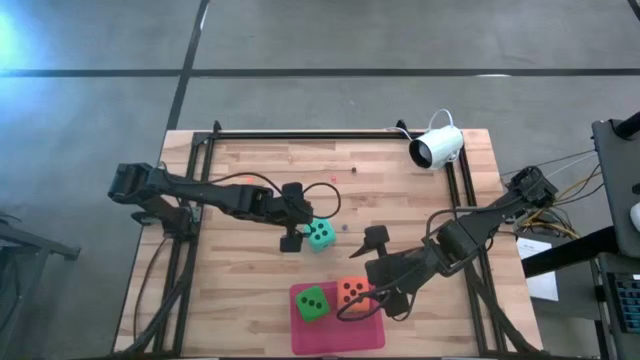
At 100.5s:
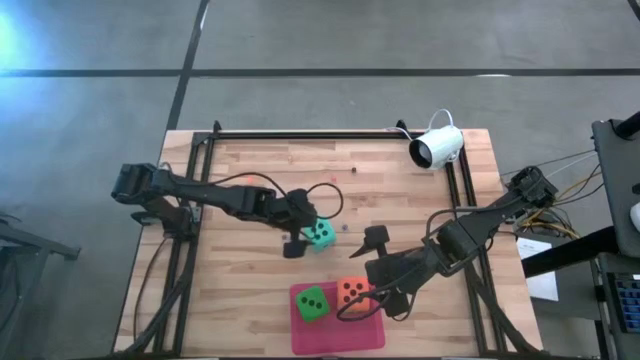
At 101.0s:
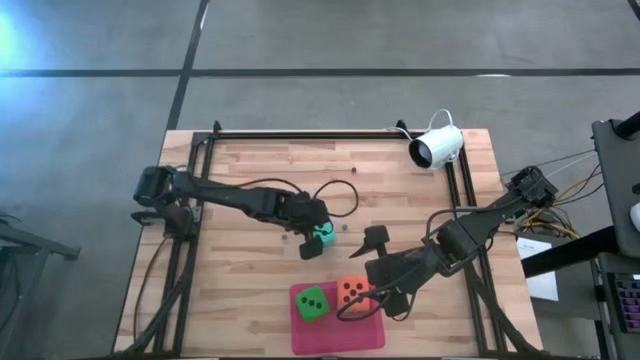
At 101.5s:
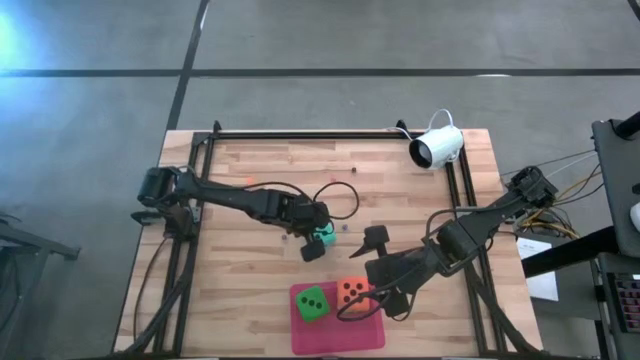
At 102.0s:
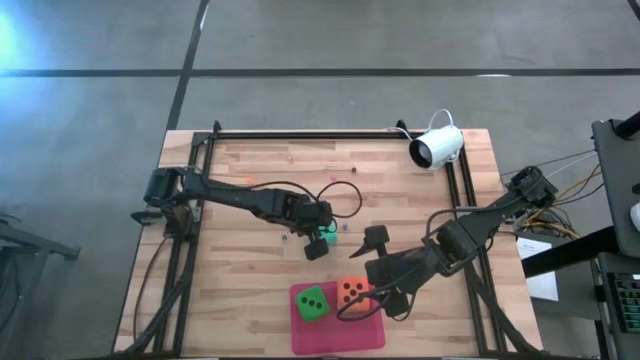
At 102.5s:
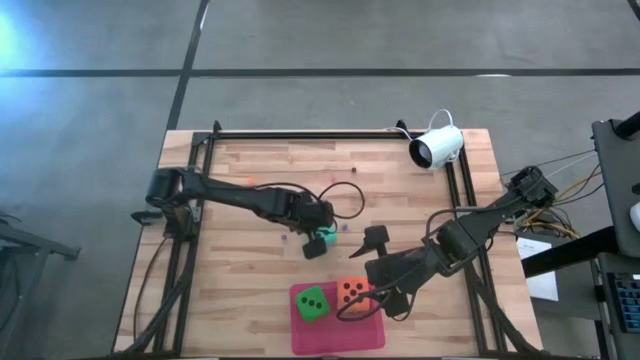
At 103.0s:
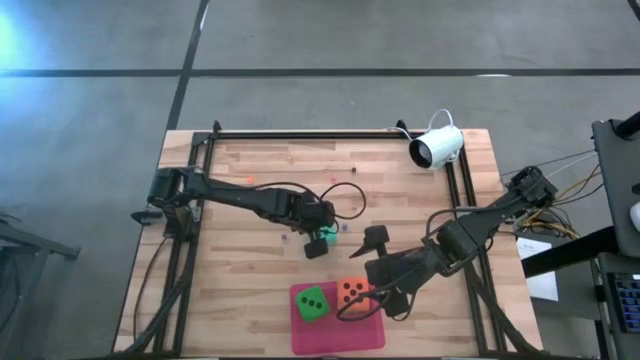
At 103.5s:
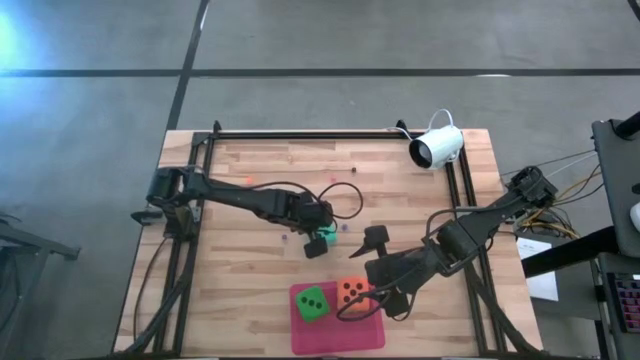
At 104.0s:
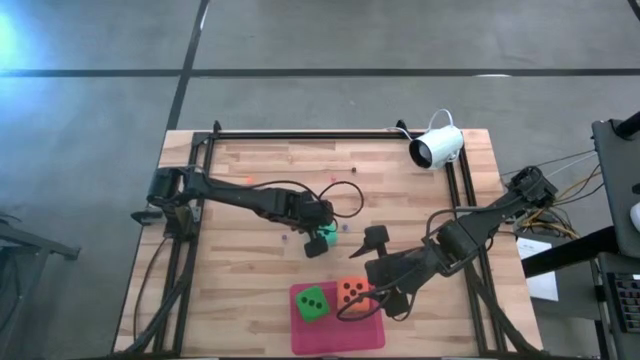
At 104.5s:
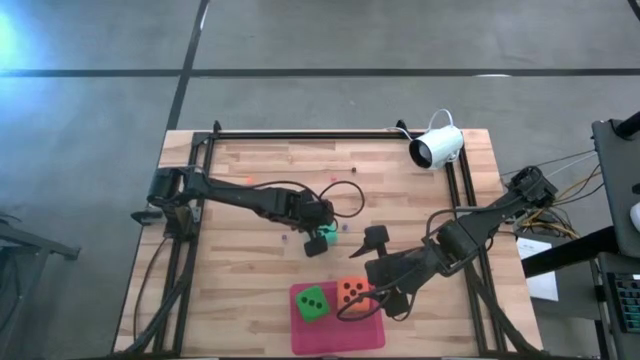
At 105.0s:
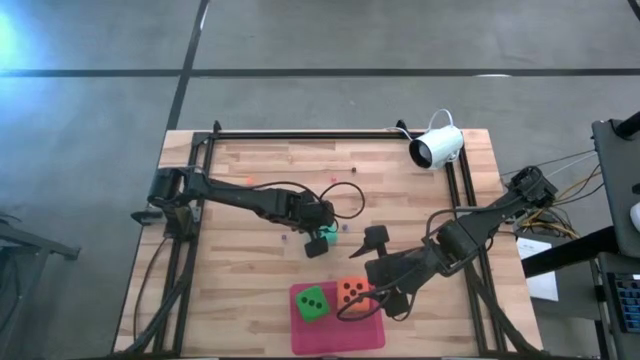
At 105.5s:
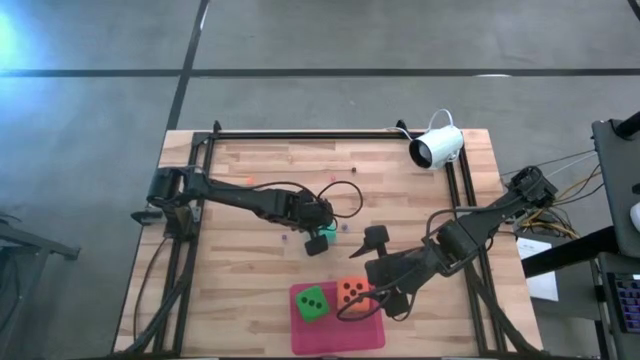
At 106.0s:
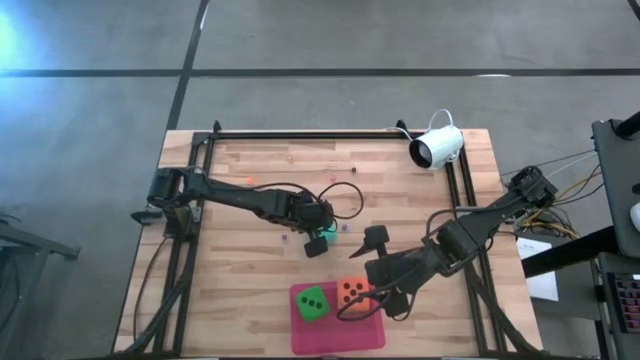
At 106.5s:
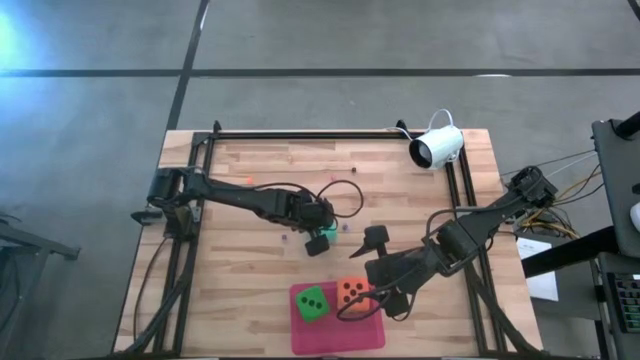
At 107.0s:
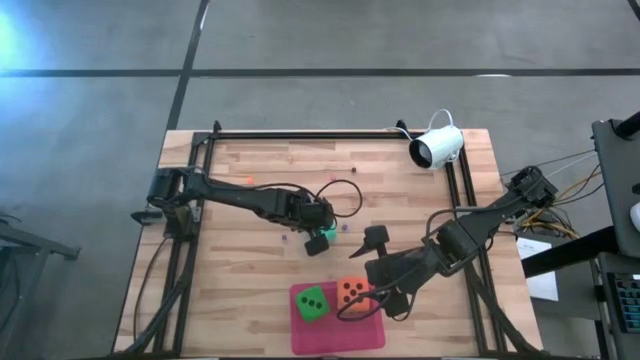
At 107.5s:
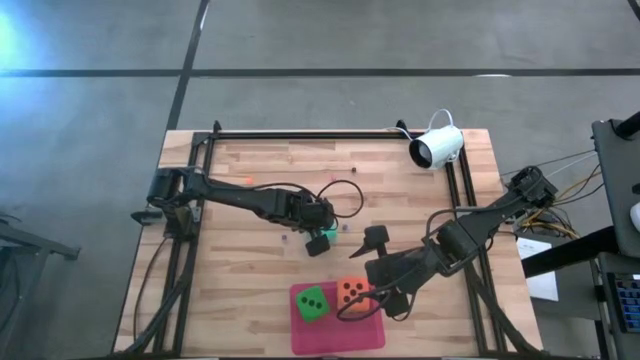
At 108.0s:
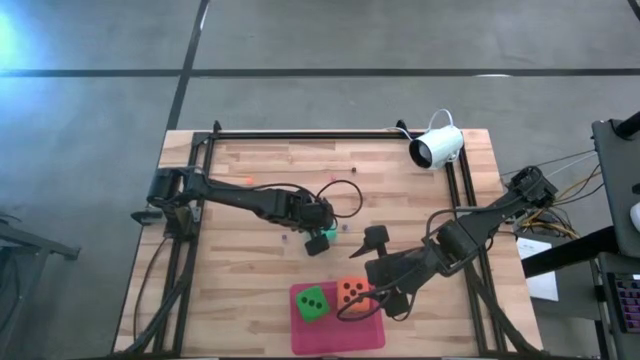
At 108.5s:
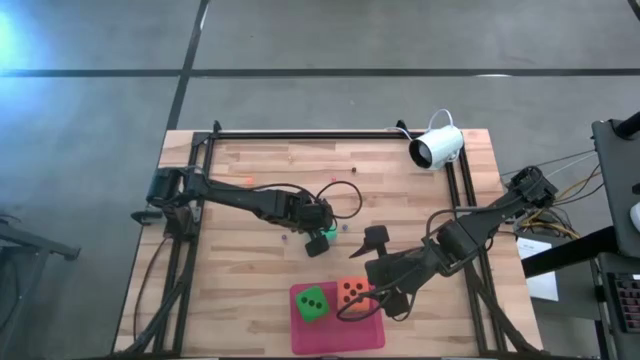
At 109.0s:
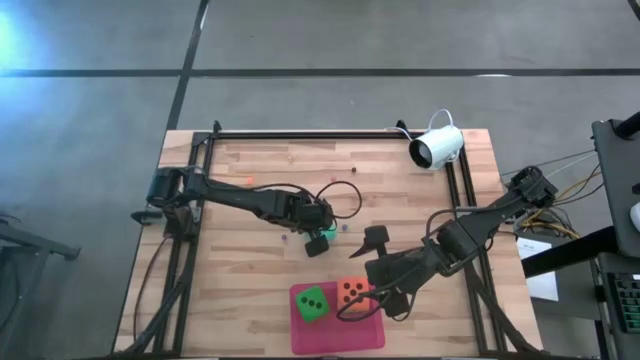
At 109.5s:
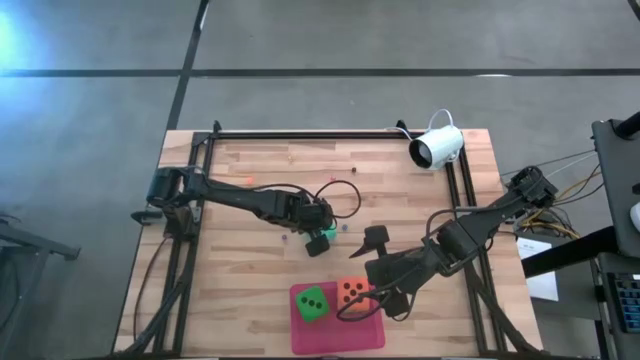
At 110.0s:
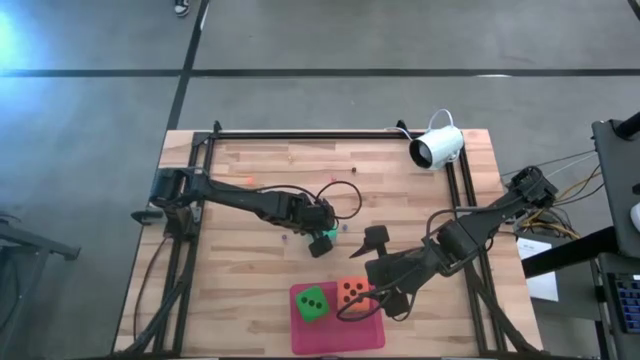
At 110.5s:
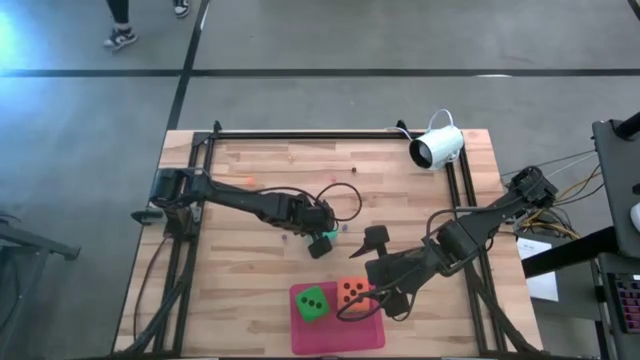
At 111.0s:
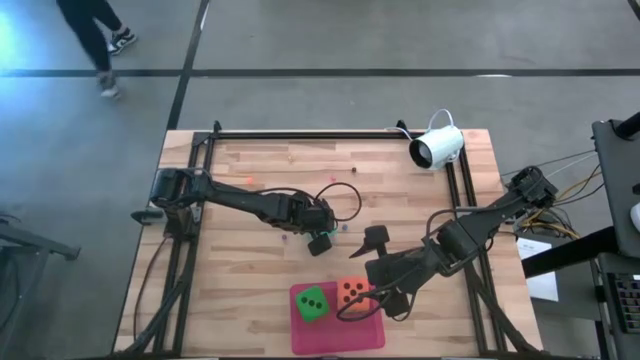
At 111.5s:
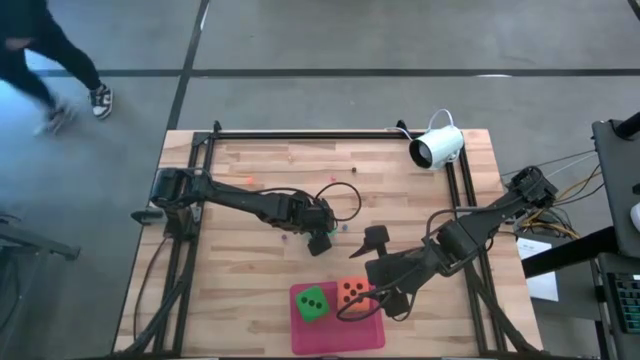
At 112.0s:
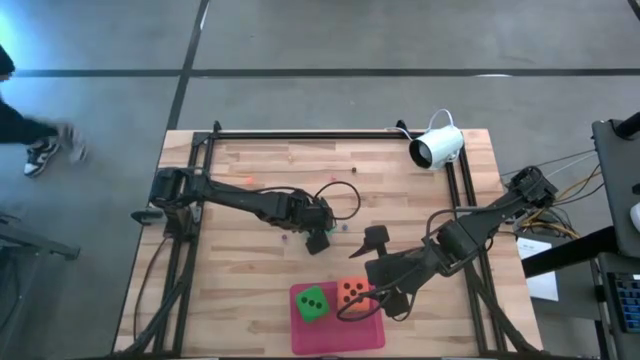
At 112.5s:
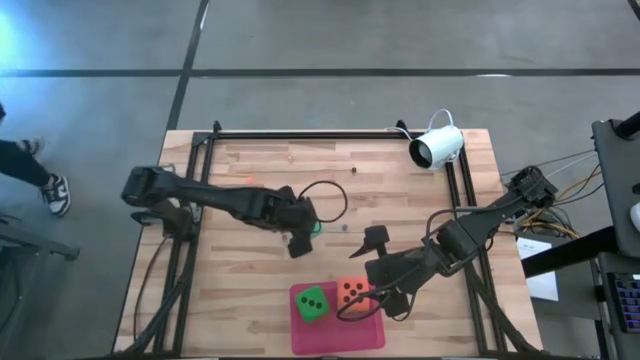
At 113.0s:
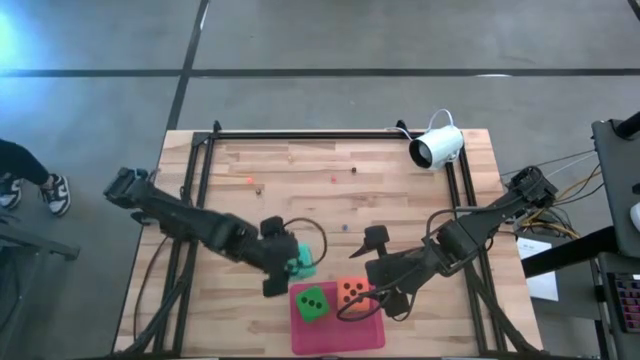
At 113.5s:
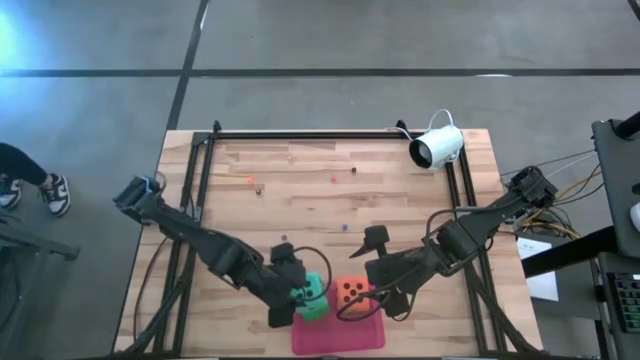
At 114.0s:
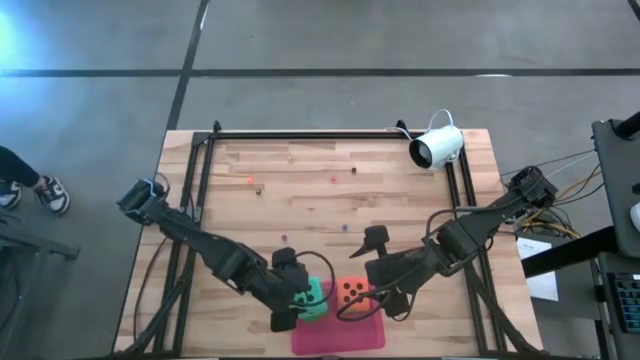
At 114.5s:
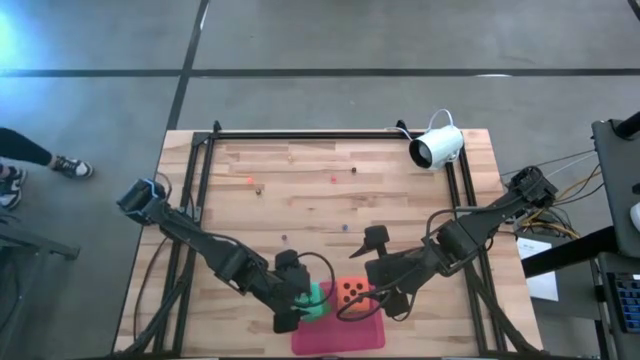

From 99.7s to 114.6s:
Task: Pick & Place Dice
Put the light blue dice into the pink bin

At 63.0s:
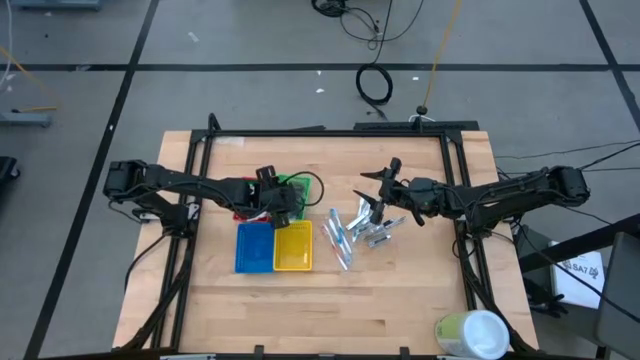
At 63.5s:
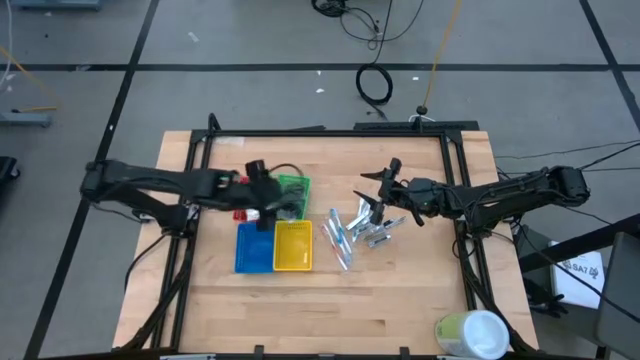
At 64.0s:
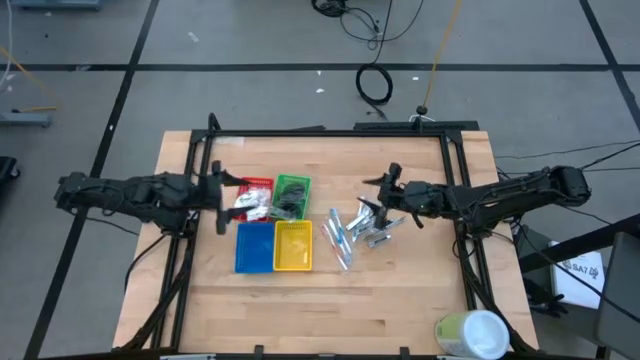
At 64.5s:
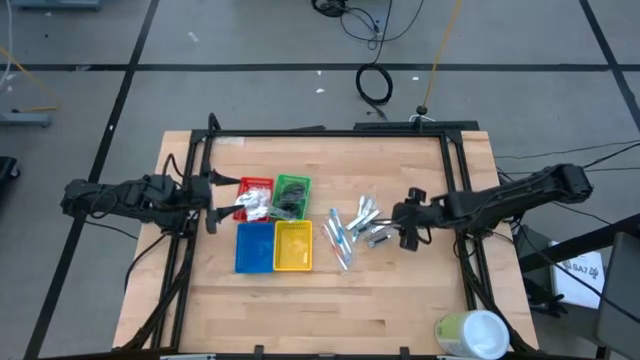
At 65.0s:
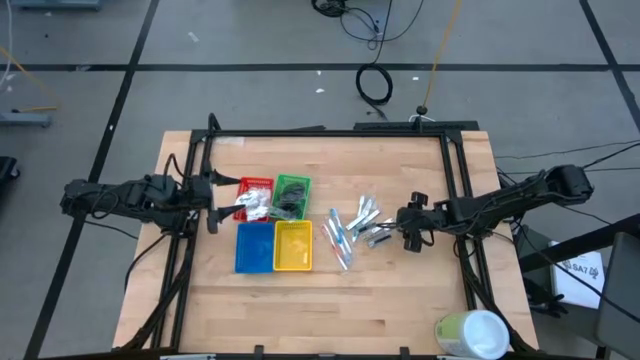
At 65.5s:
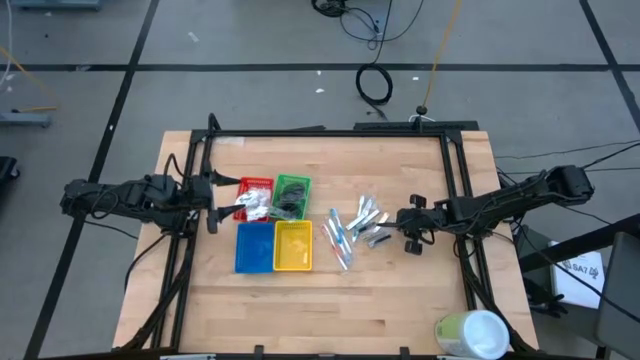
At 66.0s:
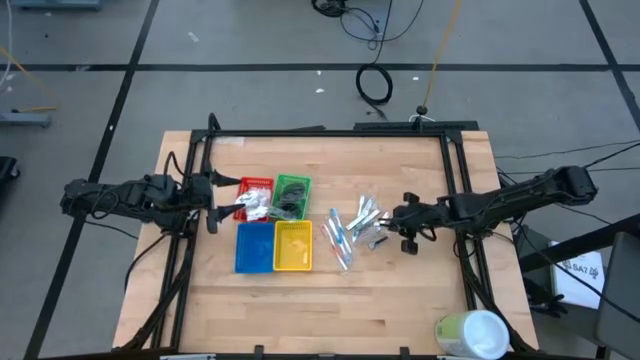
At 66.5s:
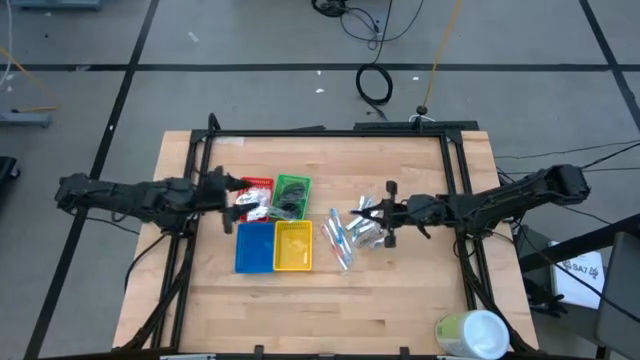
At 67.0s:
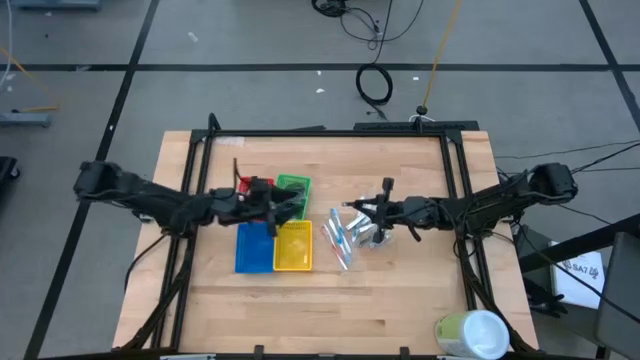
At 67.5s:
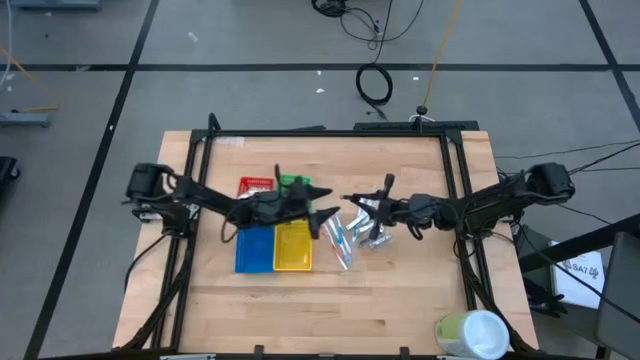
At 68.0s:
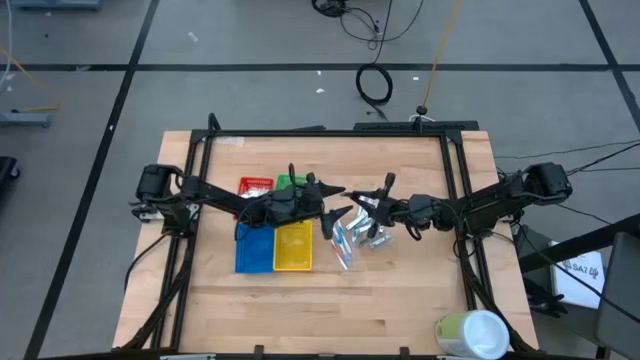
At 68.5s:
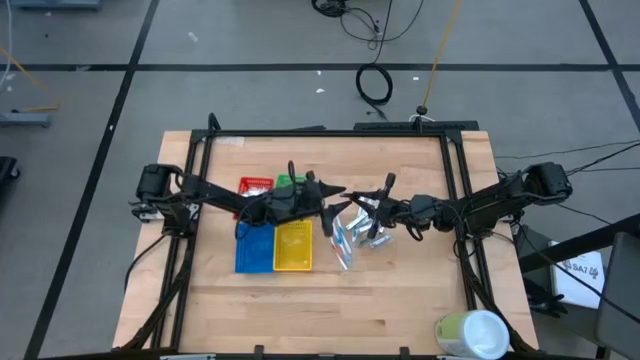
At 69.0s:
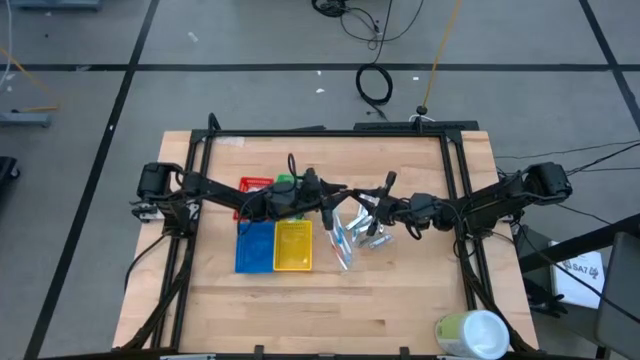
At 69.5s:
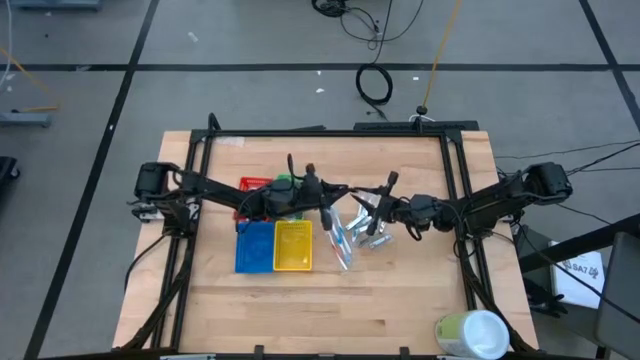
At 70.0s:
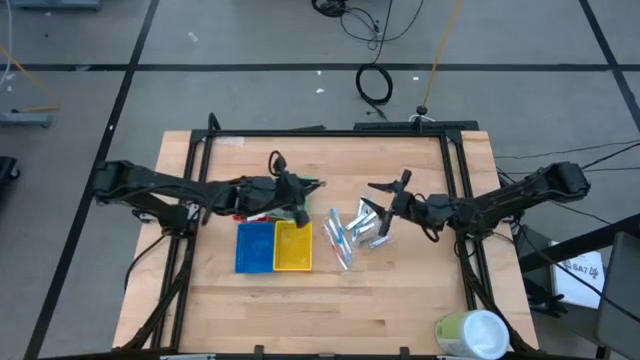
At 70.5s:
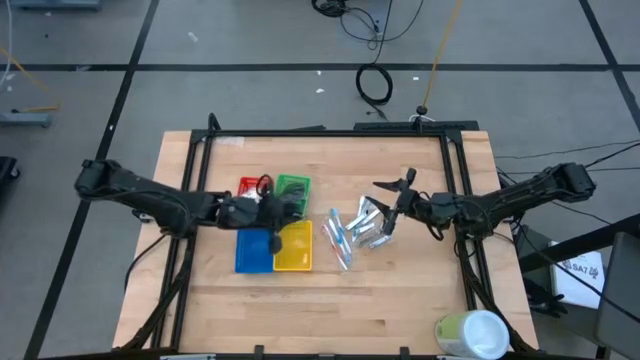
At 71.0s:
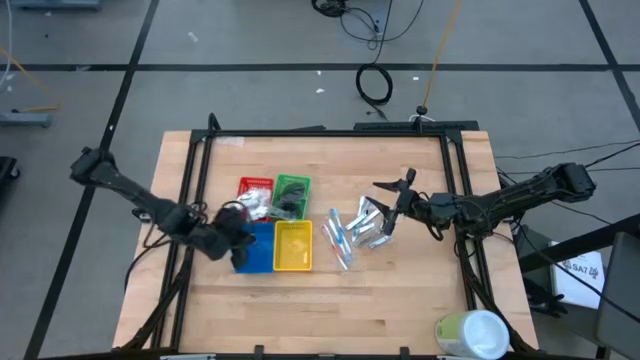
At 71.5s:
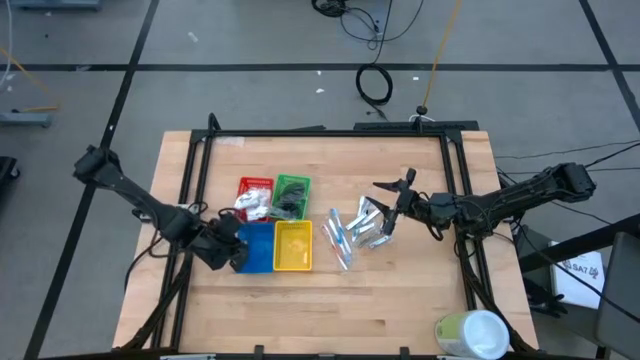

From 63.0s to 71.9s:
Task: Pick & Place Travel size toiletries
Put the silver nail cutter into the blue bin
